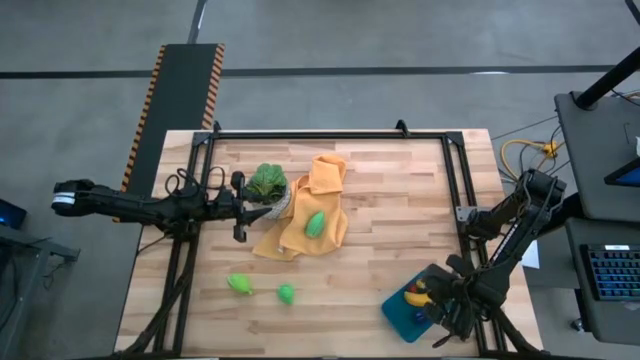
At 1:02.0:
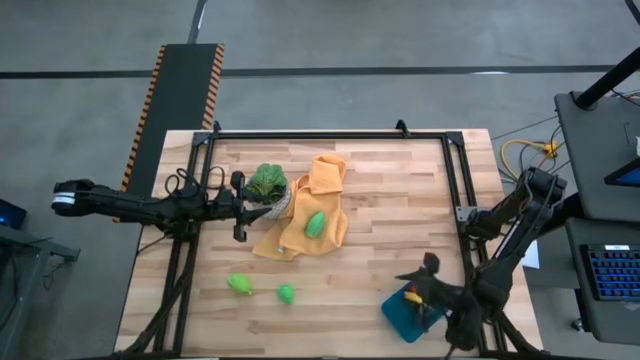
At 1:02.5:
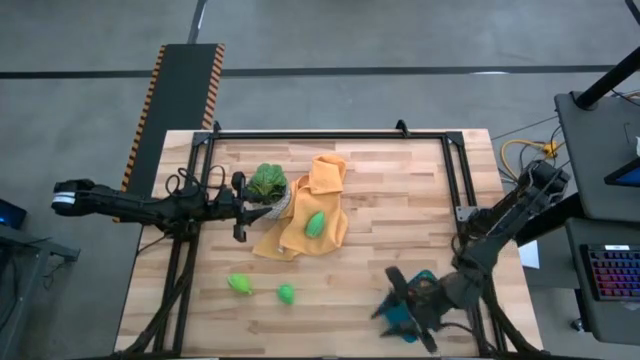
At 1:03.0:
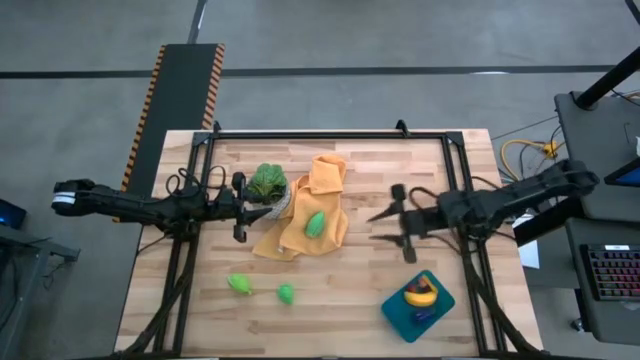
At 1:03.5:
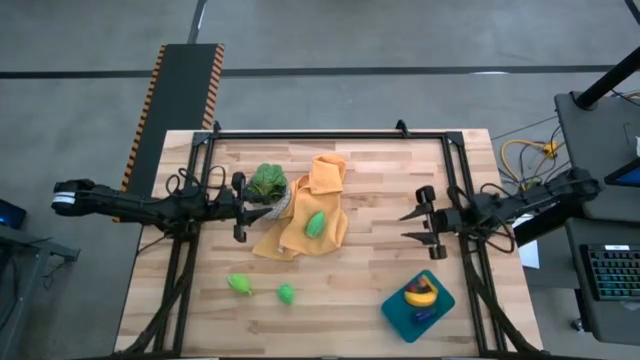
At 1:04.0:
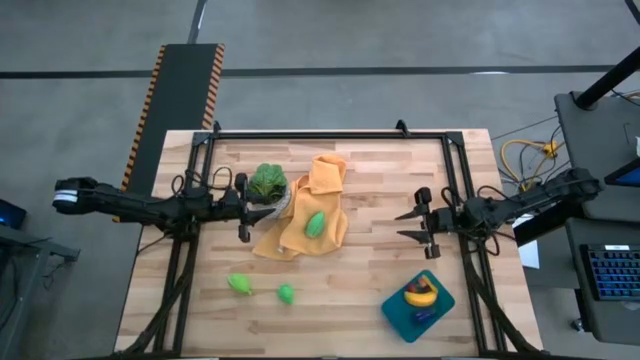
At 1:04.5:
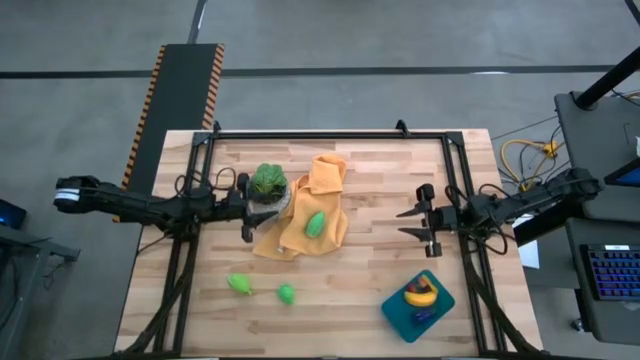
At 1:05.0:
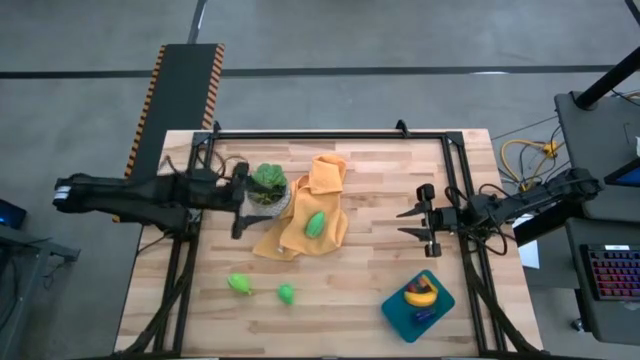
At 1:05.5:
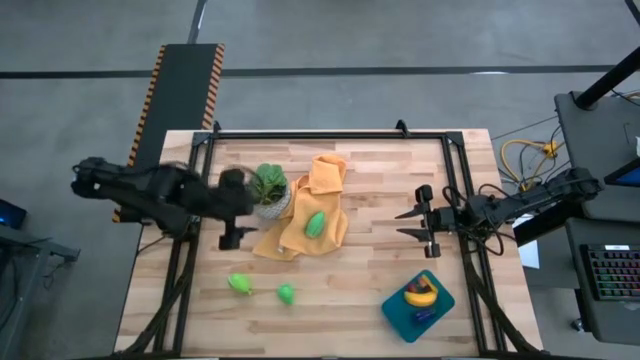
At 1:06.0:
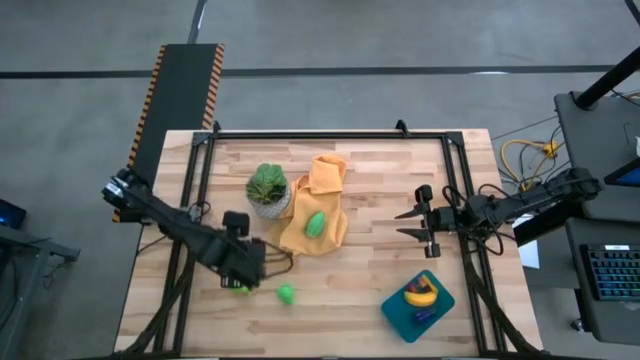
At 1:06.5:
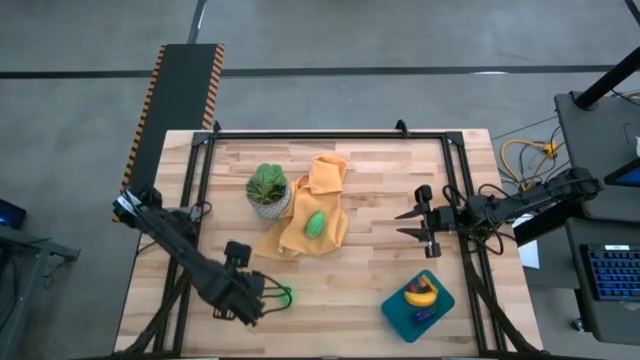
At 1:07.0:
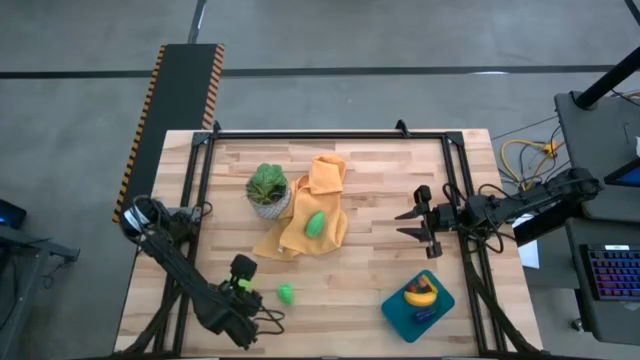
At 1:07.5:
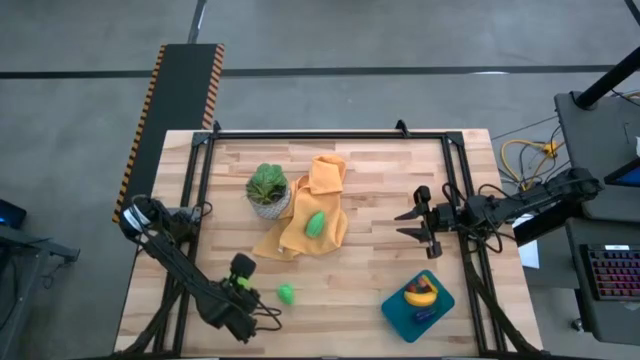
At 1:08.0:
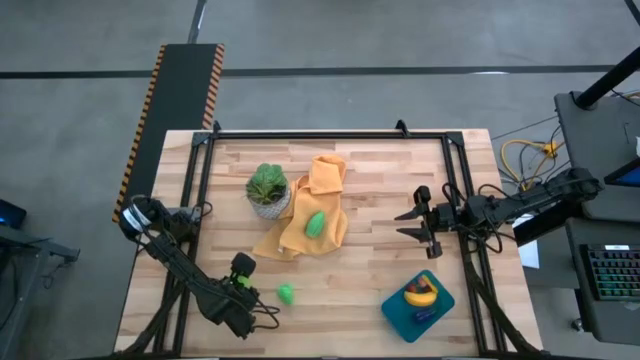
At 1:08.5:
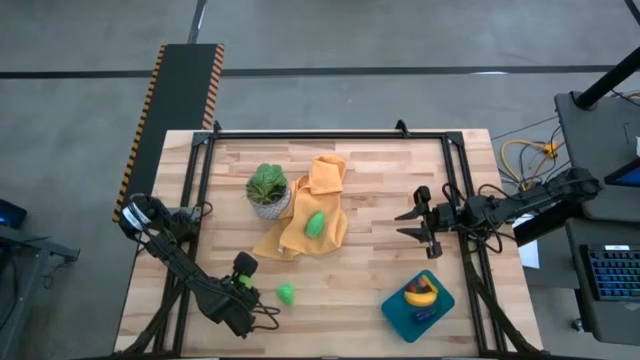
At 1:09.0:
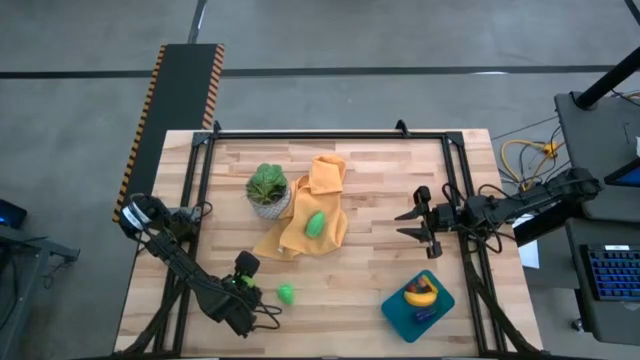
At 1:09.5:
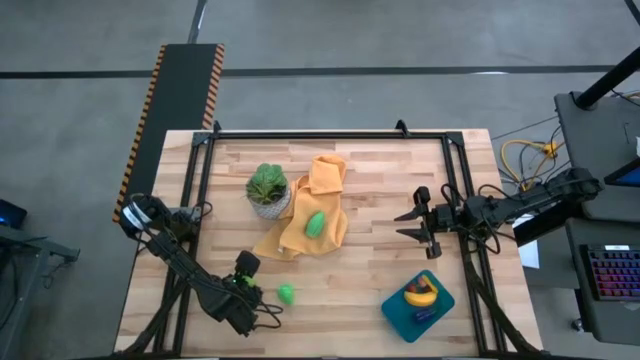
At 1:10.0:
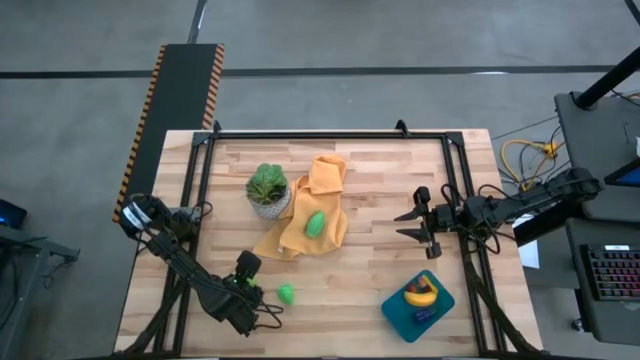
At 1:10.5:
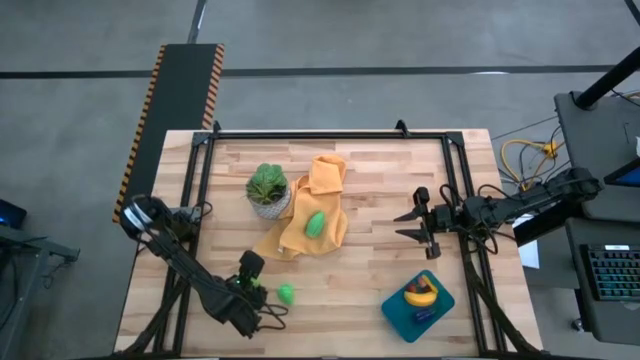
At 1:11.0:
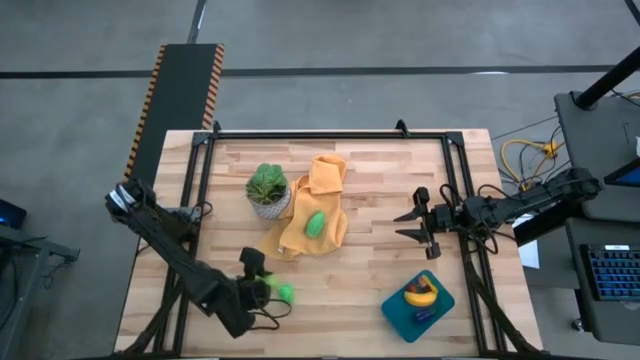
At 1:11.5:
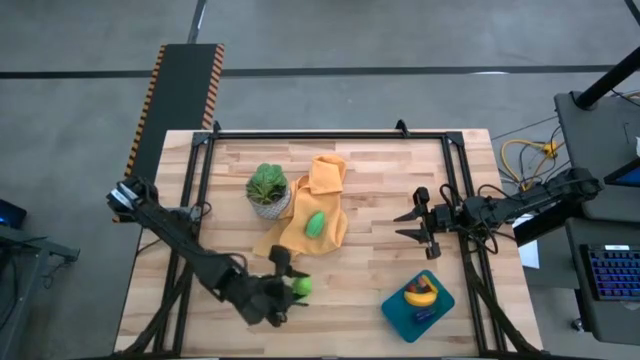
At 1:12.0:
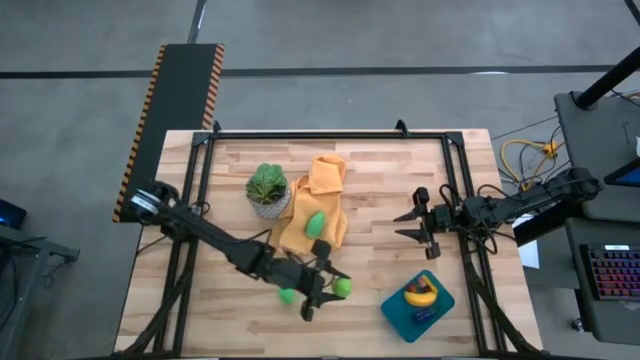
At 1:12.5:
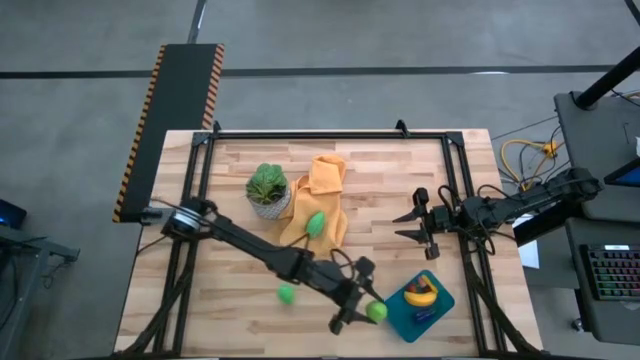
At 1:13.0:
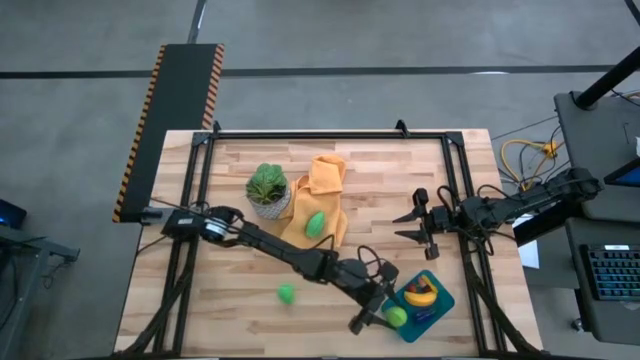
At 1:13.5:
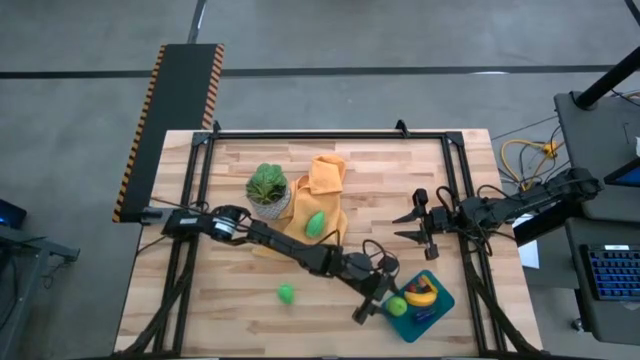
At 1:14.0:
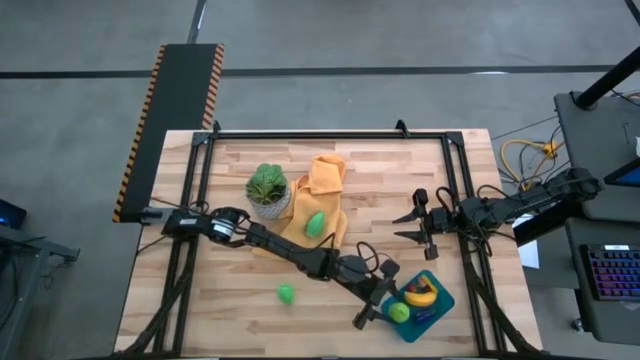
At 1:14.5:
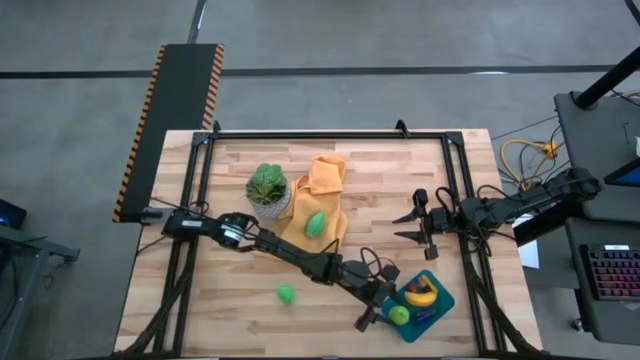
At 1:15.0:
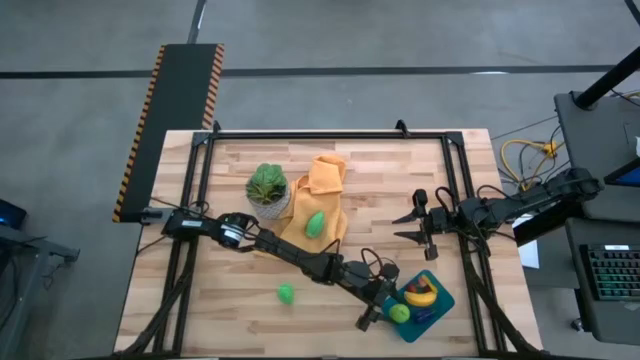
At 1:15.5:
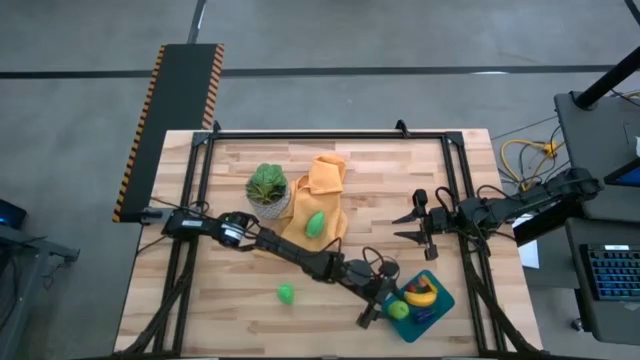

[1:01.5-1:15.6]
Task: Pick and placing Produce into tupperware
Put the melon into the blue bin

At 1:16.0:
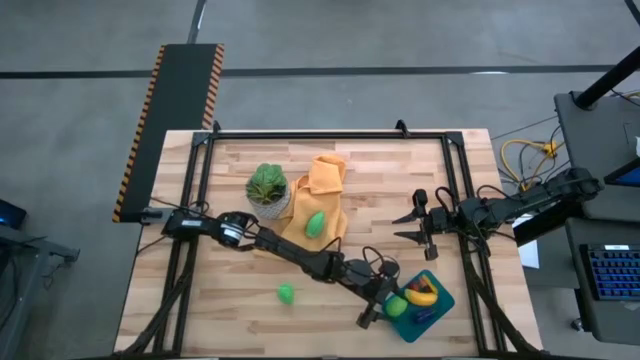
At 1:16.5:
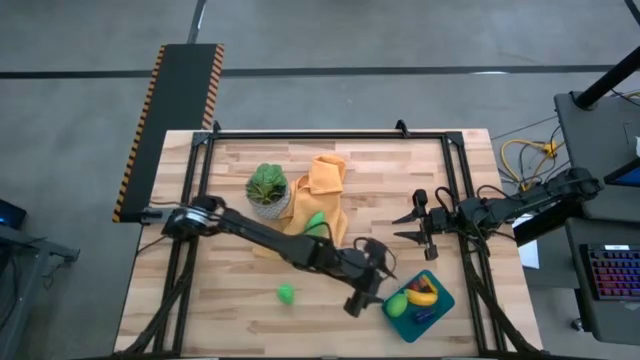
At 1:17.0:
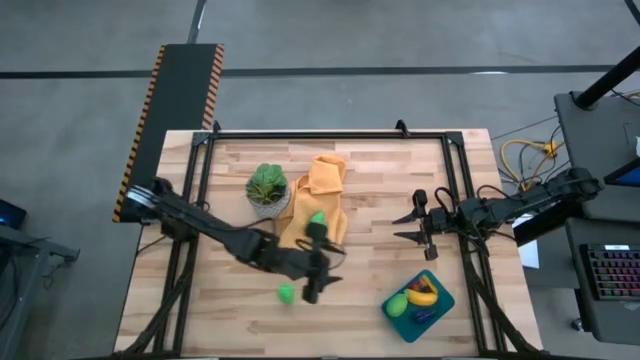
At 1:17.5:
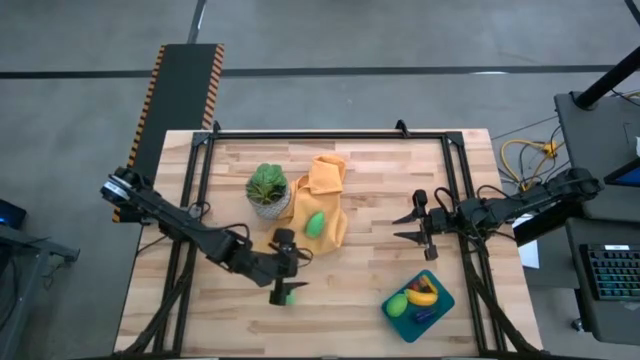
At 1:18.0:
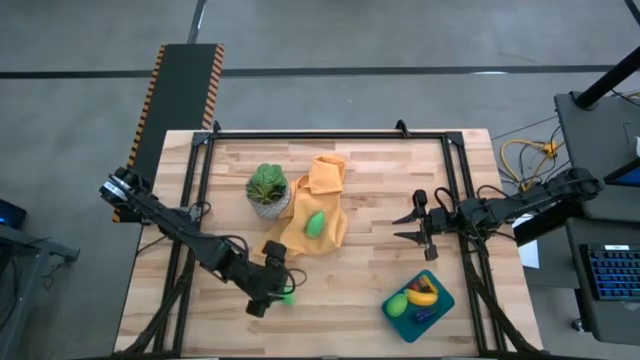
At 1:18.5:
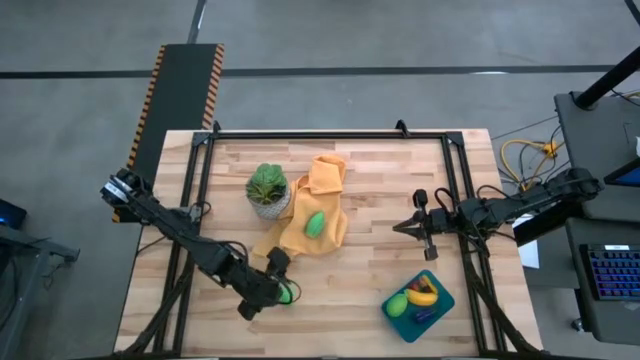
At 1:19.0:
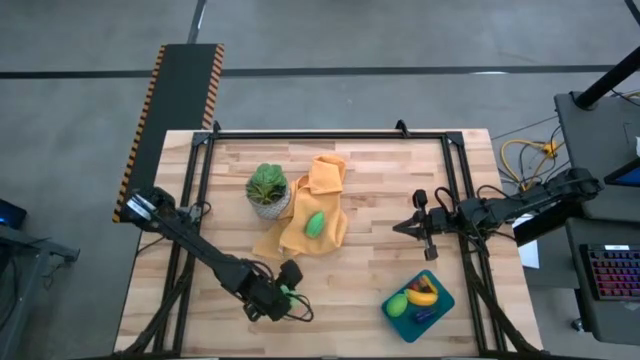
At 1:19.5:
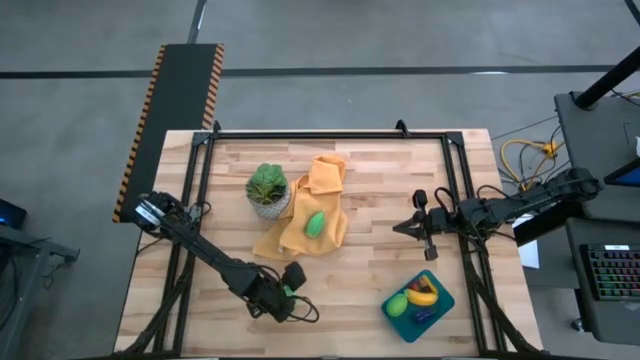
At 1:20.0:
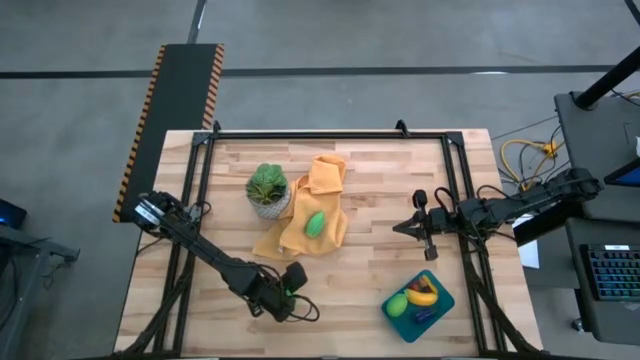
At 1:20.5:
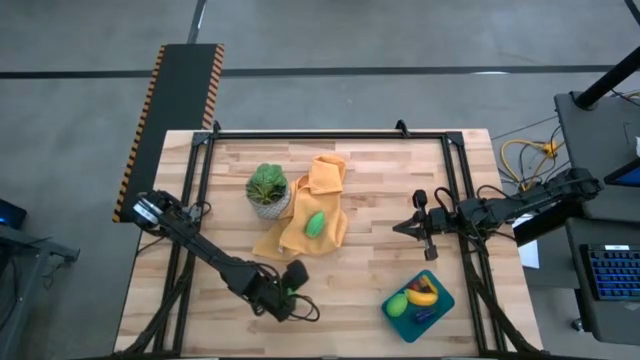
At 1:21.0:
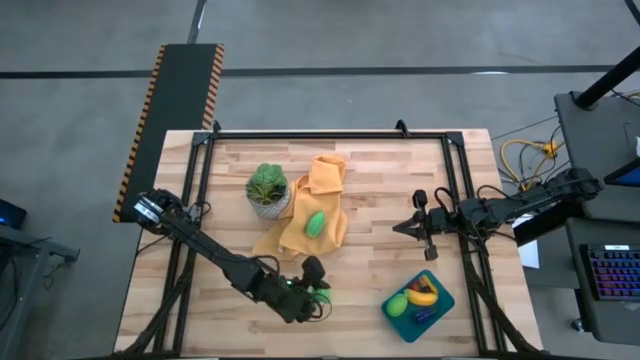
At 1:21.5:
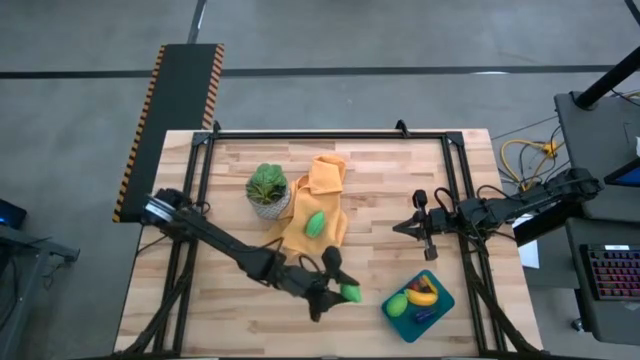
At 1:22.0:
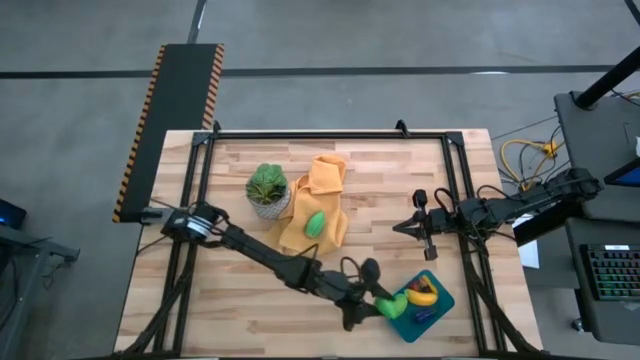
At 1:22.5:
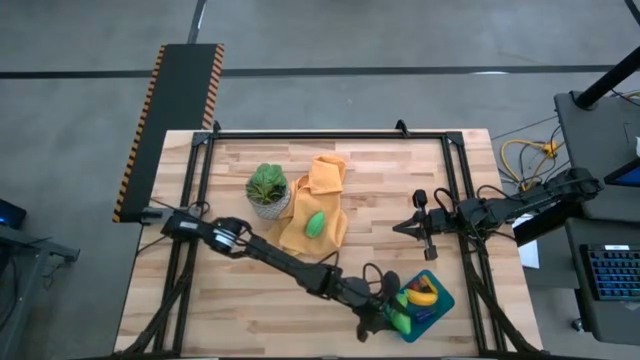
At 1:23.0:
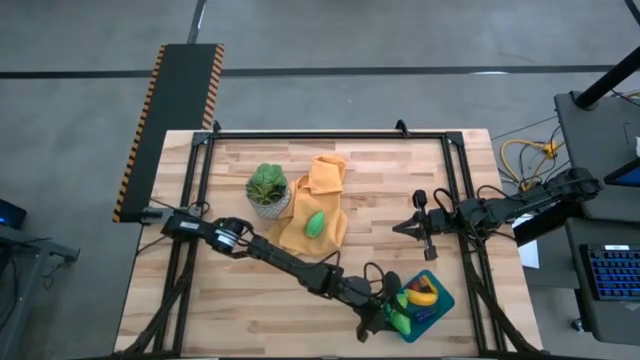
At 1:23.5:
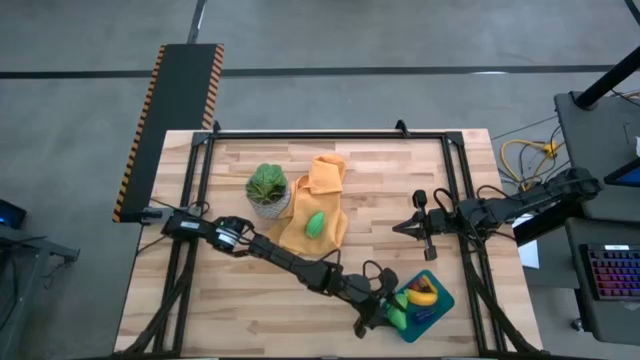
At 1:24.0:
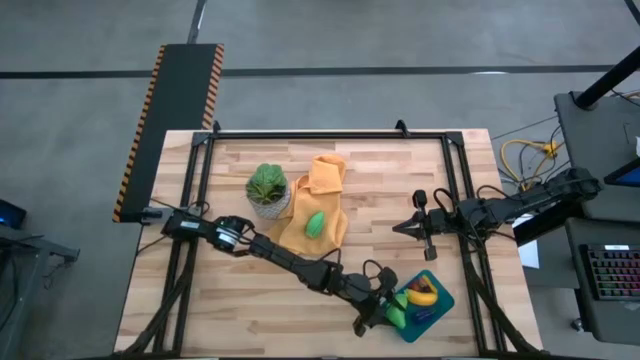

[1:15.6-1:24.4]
Put the pear into the blue bin
